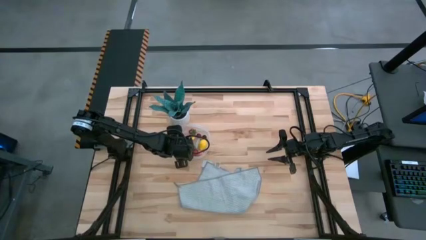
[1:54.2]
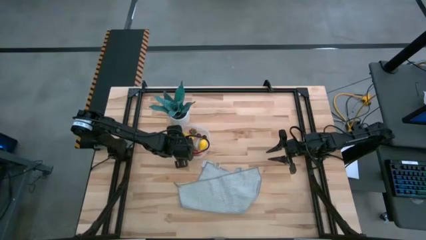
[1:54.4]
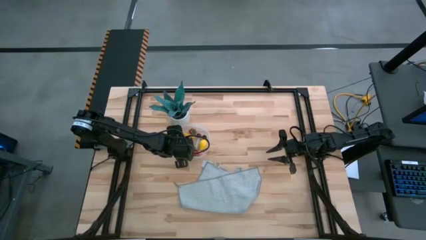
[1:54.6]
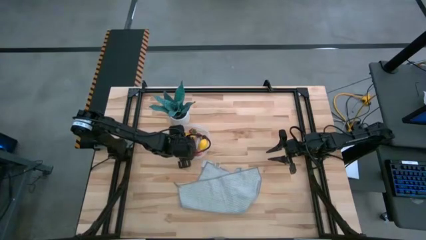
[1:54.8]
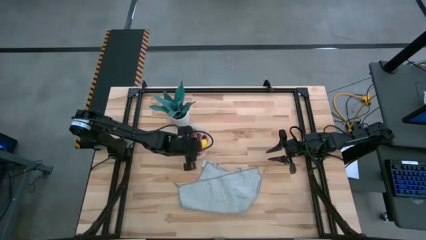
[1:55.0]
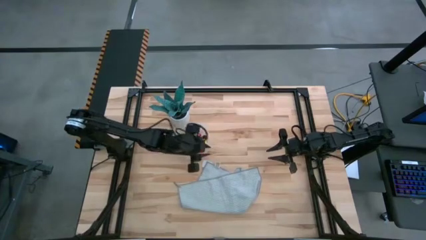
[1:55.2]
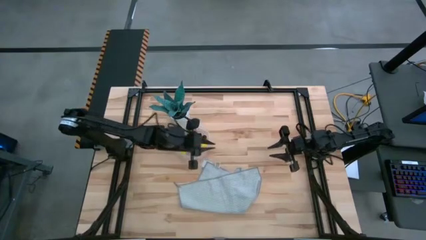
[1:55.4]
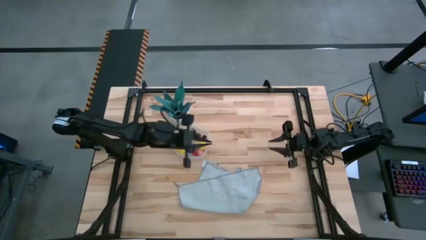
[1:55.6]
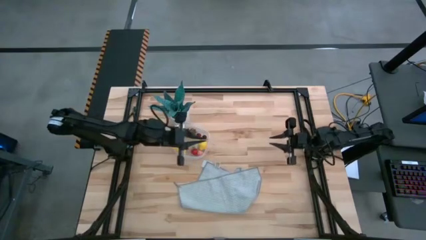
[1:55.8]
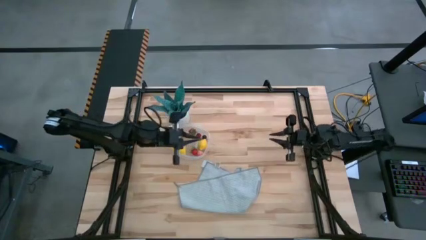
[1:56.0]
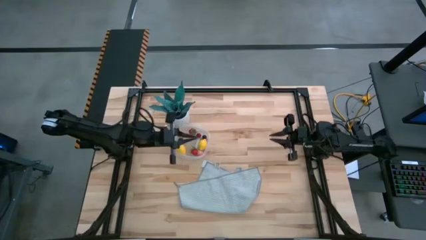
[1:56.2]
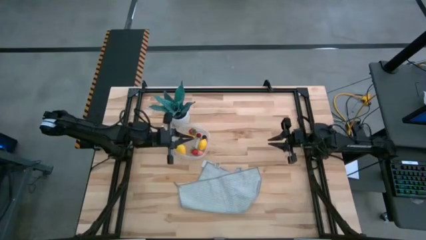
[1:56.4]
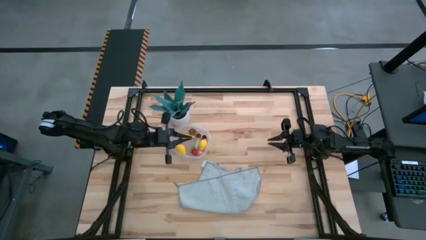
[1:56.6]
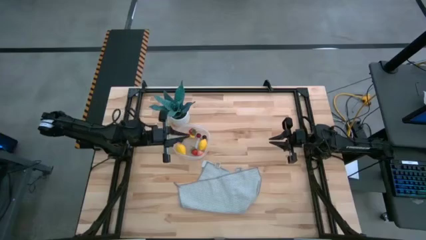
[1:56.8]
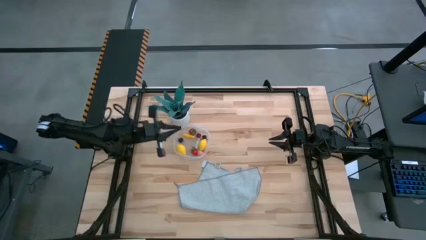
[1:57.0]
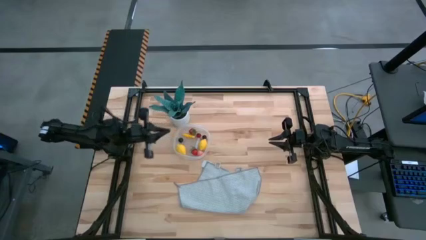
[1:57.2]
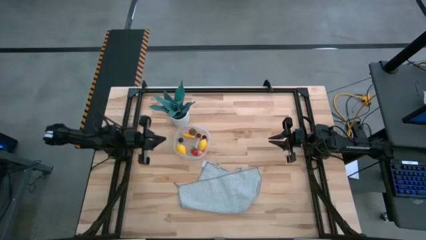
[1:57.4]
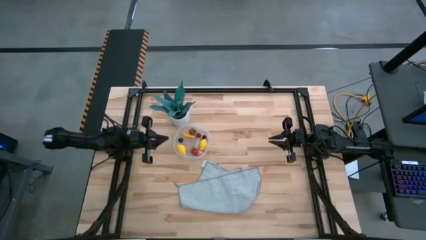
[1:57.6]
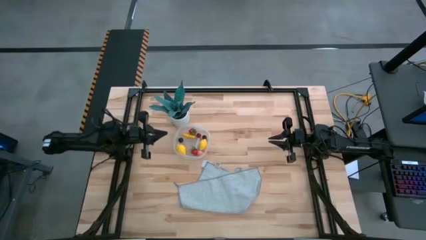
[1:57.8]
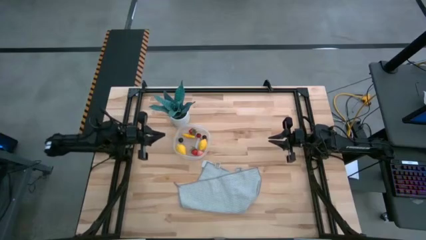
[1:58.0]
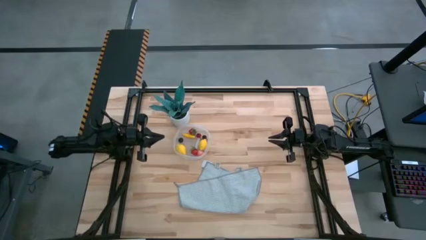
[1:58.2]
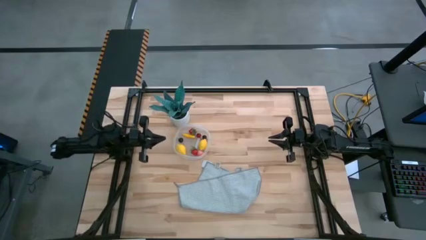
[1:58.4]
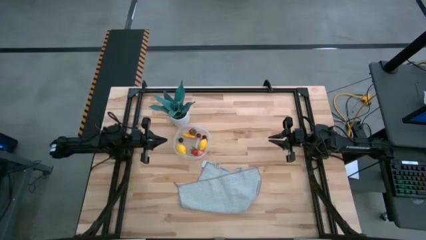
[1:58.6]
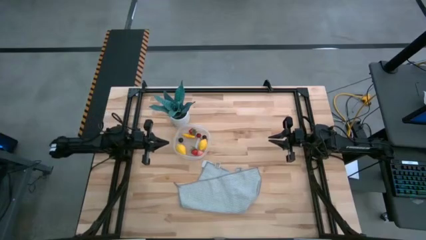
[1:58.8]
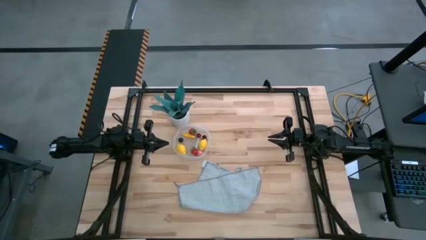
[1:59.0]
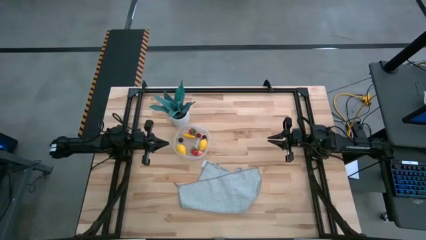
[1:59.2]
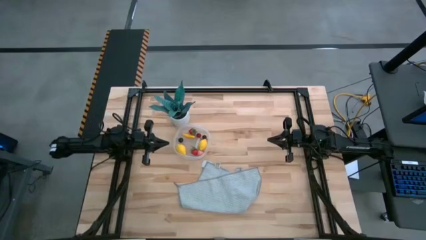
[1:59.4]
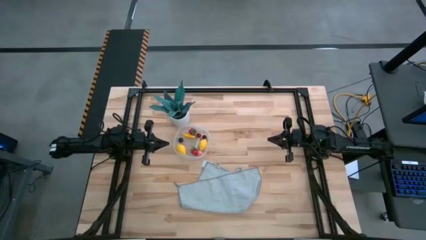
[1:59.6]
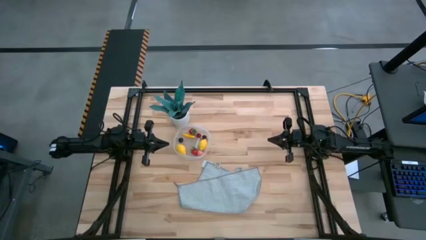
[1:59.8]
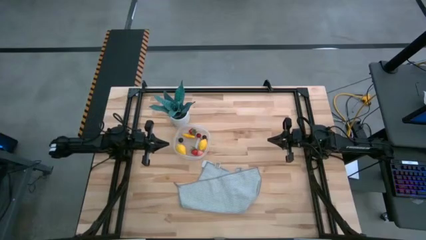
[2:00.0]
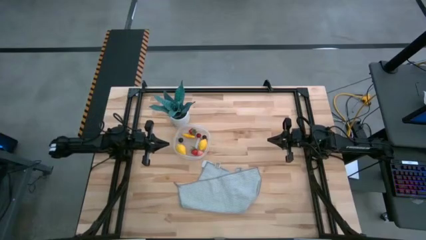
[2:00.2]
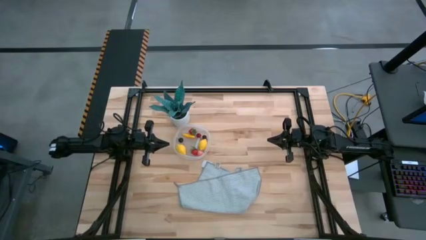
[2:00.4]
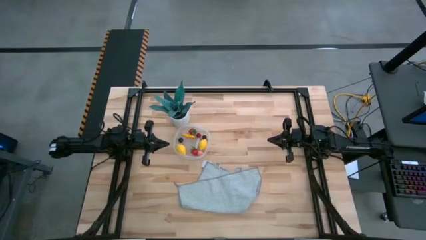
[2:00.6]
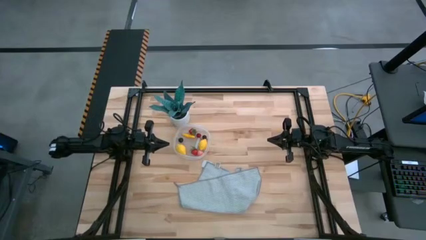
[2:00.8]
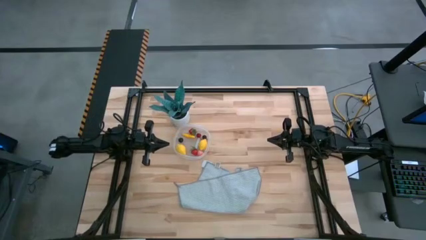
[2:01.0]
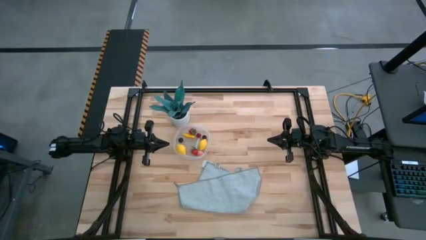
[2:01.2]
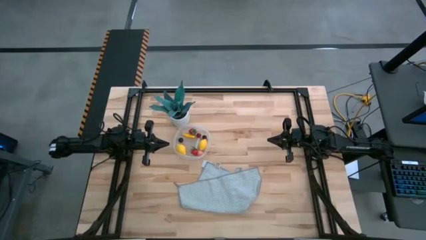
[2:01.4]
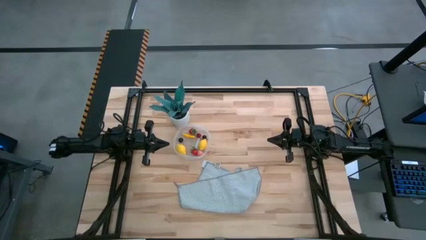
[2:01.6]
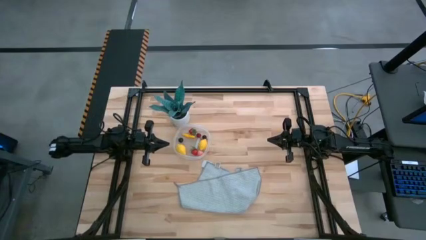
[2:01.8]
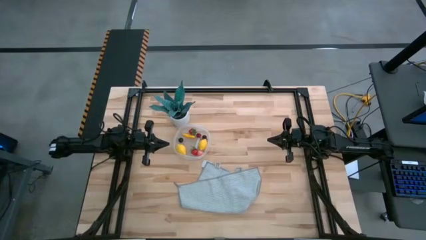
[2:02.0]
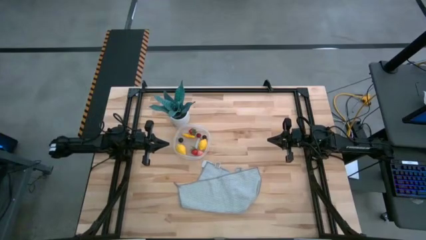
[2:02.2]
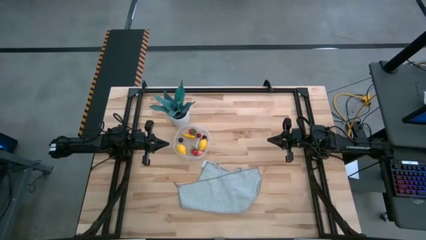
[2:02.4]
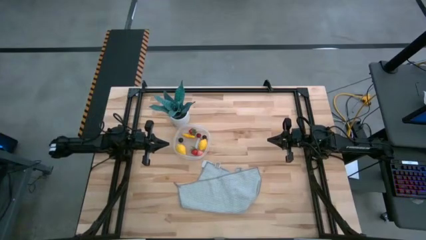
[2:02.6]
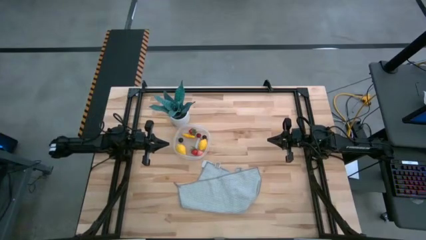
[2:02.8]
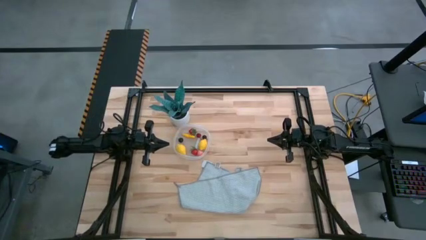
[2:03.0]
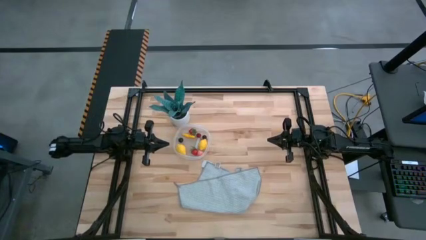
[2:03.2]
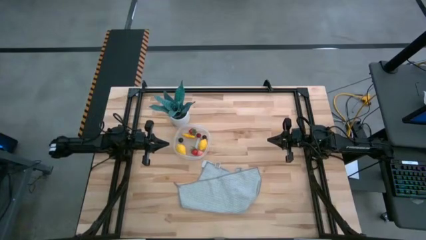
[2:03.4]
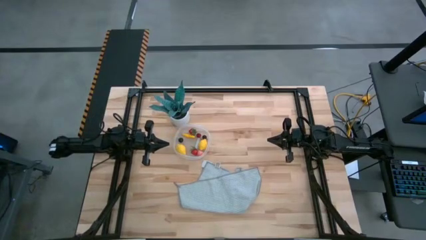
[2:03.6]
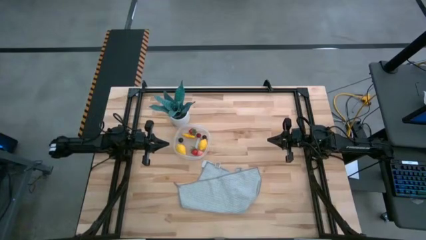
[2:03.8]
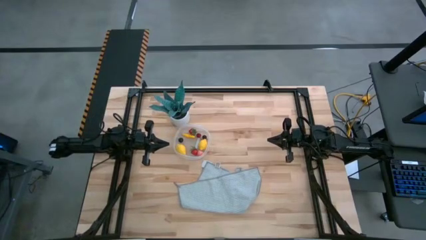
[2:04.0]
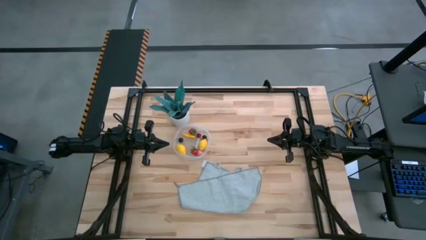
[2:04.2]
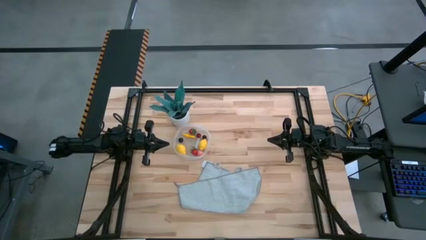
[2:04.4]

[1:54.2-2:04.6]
Task: Pick and placing Produce into tupperware
Return to Home Position

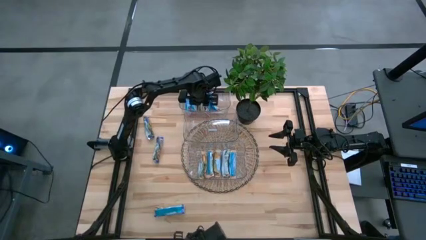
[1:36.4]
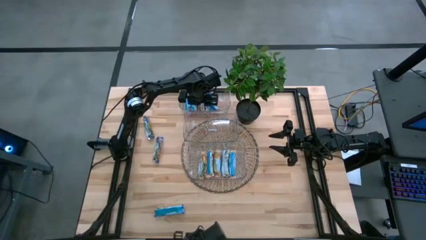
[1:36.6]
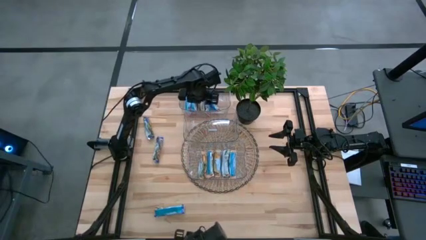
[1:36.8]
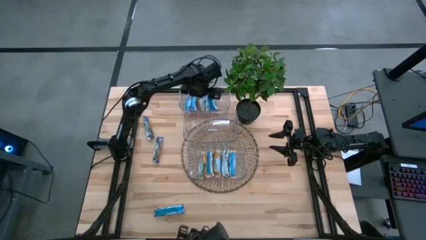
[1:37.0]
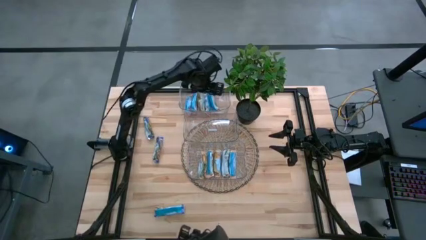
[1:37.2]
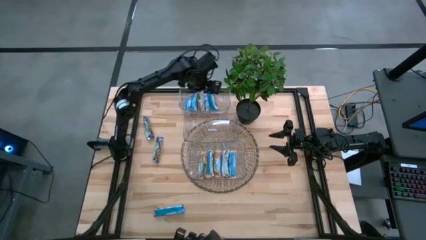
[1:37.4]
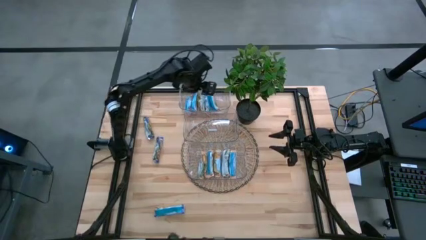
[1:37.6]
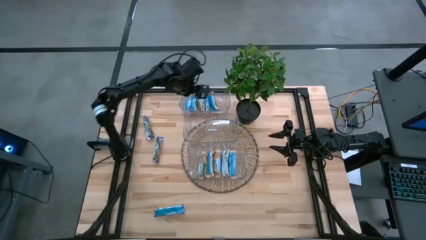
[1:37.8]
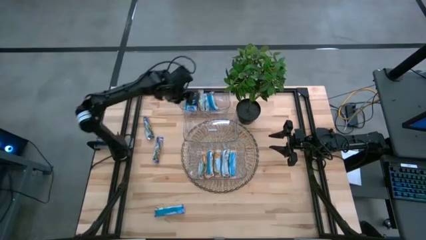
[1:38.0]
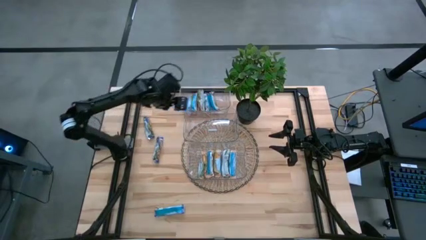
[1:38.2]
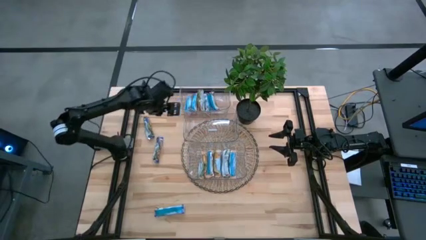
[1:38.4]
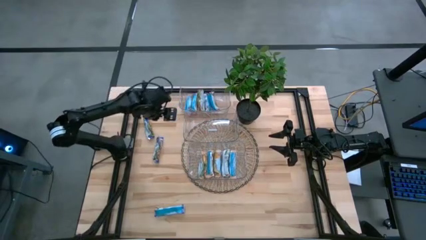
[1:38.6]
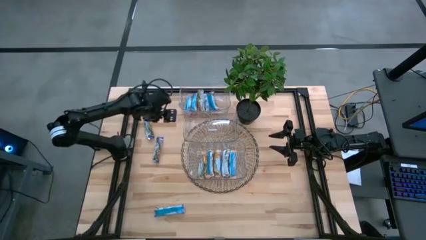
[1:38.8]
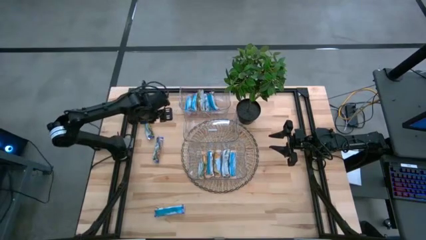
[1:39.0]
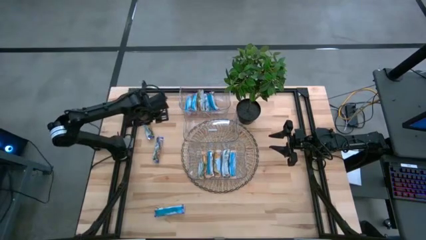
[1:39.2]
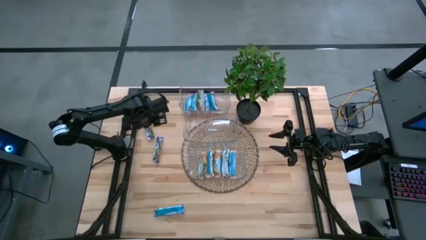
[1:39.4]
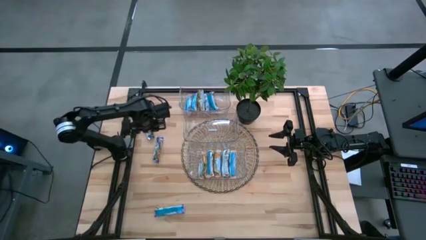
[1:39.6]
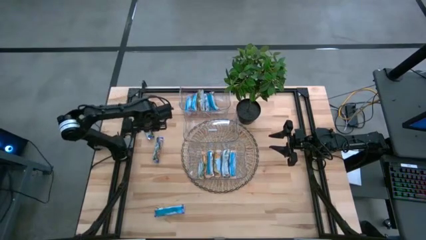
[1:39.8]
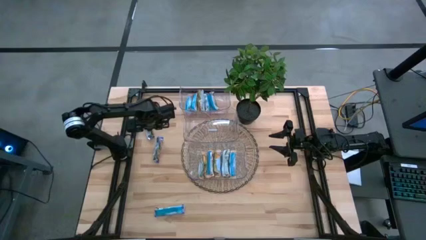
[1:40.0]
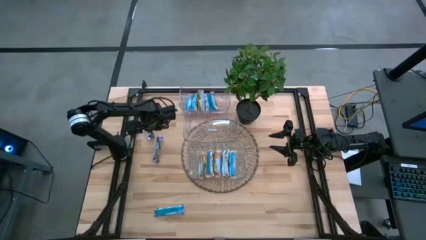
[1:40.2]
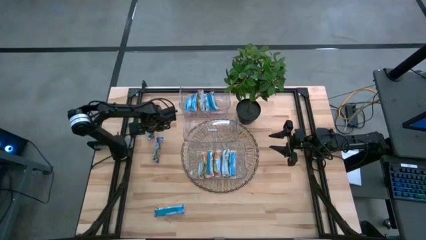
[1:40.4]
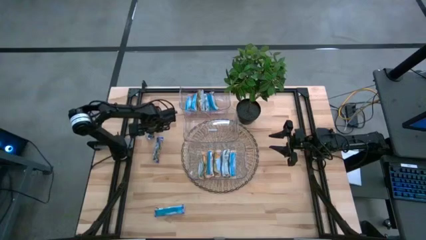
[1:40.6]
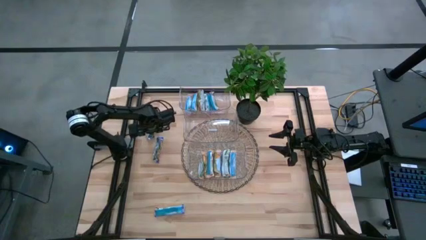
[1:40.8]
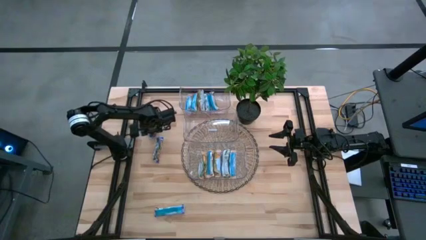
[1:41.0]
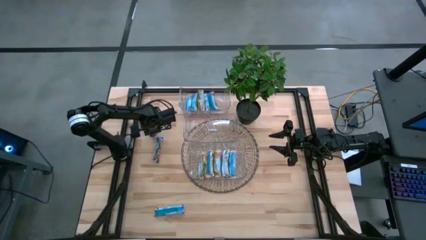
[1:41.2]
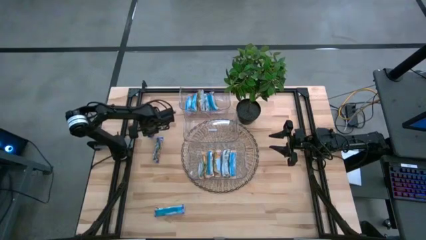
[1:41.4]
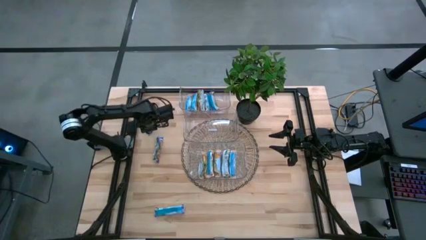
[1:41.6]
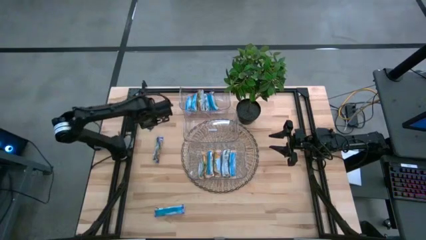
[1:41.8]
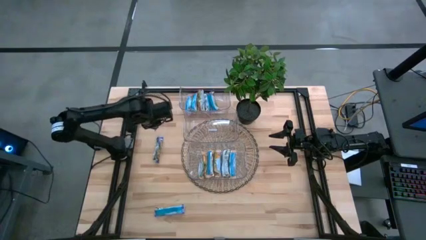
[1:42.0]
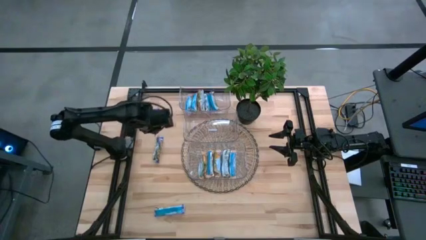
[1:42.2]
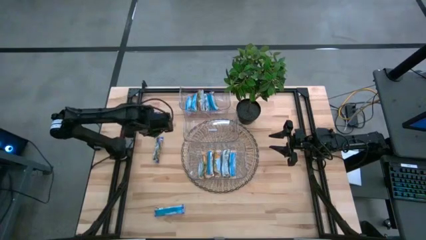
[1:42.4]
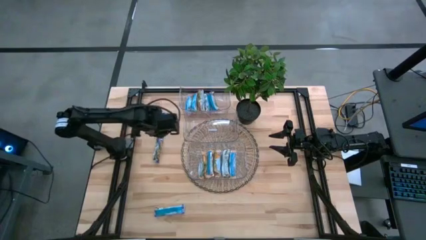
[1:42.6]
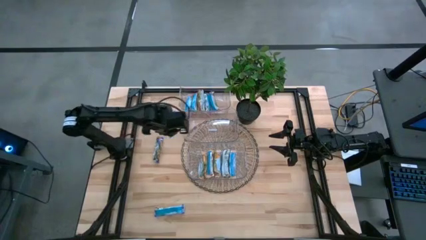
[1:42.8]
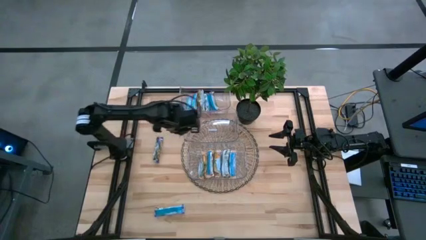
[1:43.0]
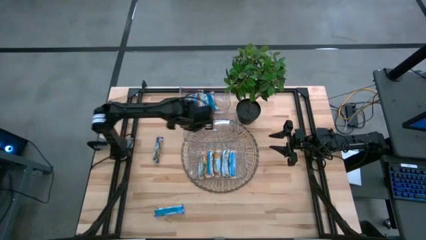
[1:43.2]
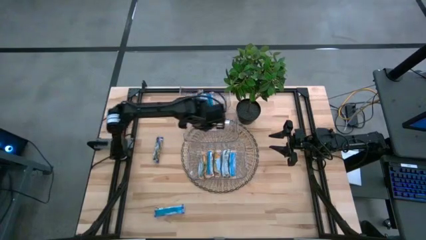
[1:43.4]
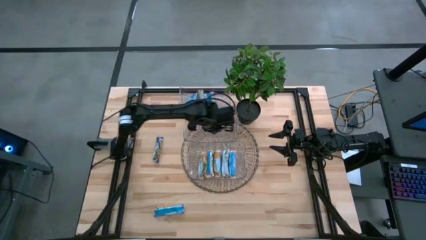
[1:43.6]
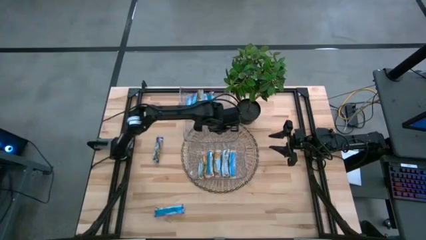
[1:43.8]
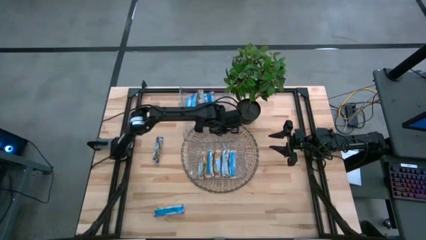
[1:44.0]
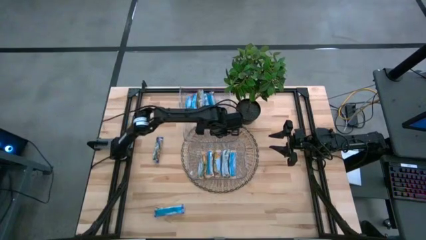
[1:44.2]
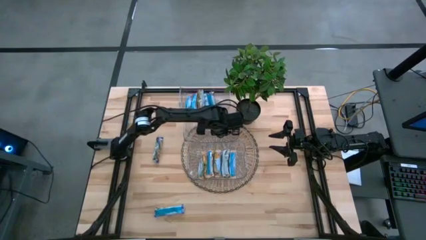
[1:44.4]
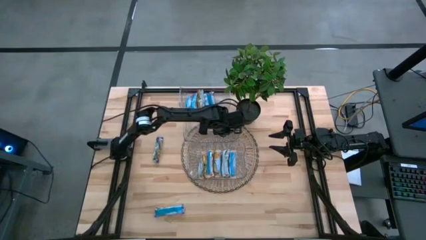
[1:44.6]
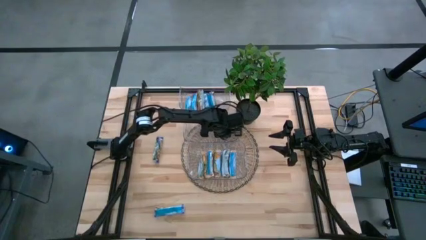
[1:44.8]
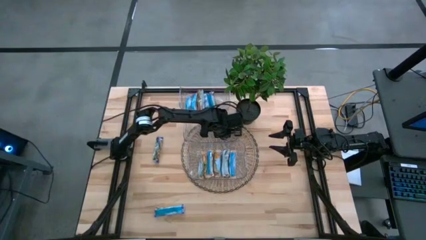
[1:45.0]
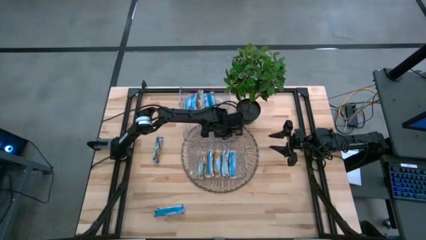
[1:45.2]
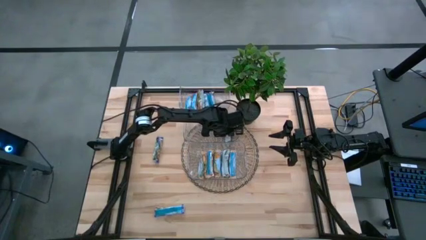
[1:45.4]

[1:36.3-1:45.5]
Task: Pick and place Granola Bars by type
Put the blue granola bar into the middle transparent bin
